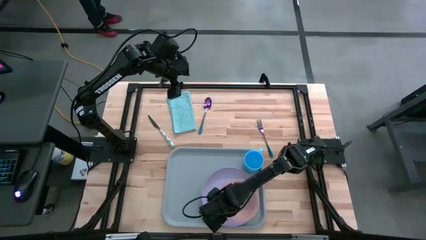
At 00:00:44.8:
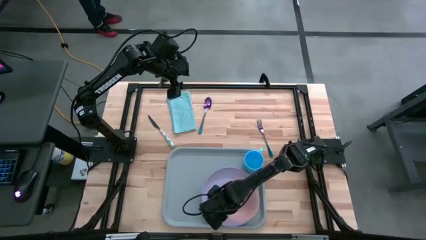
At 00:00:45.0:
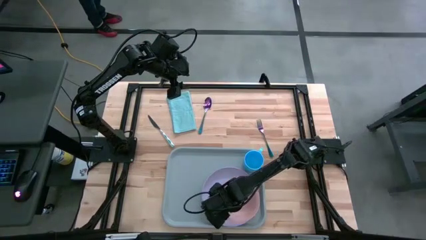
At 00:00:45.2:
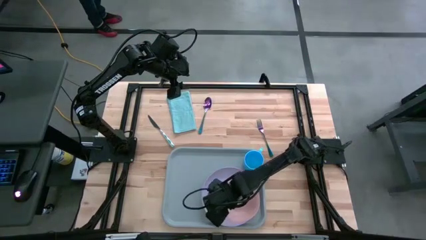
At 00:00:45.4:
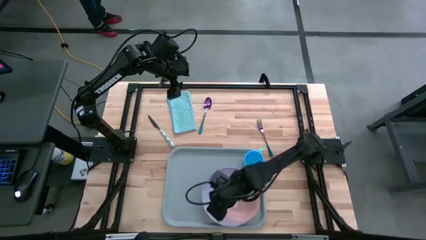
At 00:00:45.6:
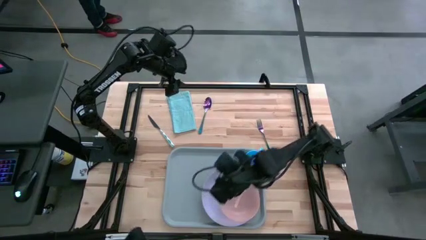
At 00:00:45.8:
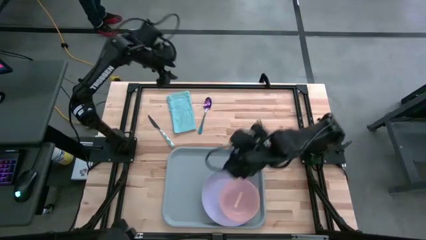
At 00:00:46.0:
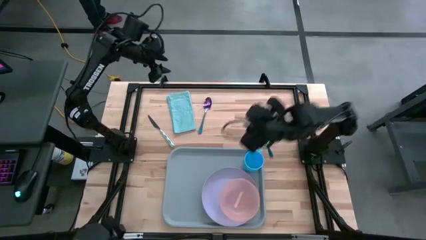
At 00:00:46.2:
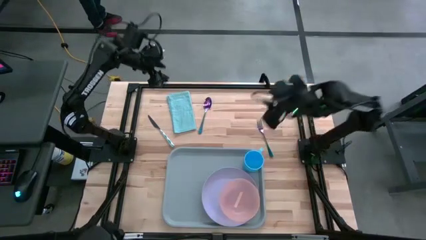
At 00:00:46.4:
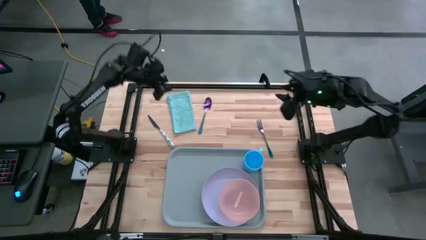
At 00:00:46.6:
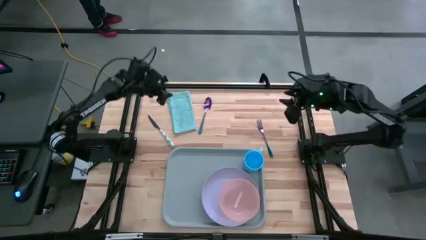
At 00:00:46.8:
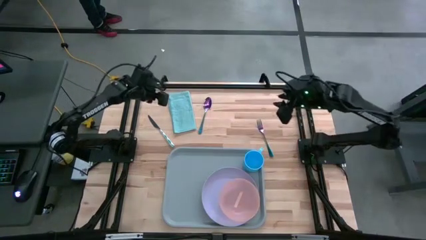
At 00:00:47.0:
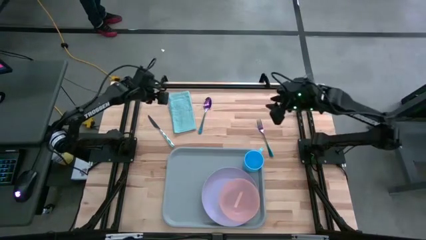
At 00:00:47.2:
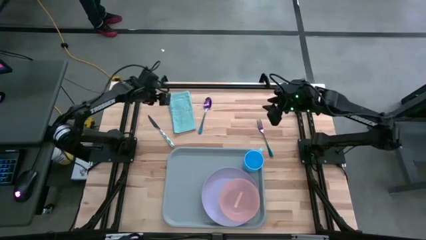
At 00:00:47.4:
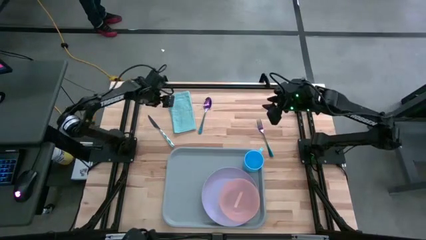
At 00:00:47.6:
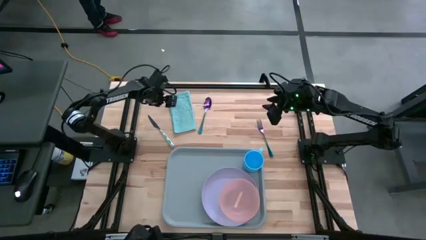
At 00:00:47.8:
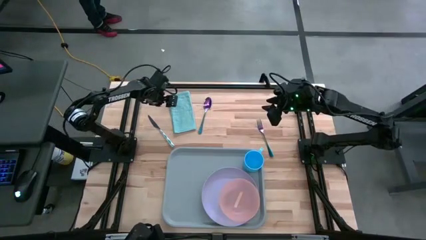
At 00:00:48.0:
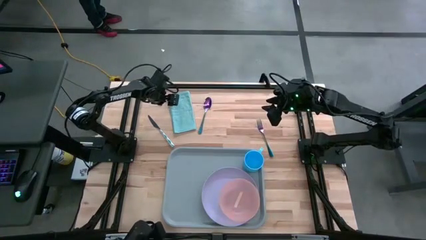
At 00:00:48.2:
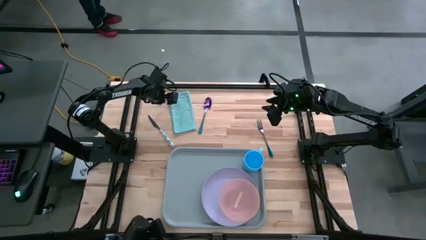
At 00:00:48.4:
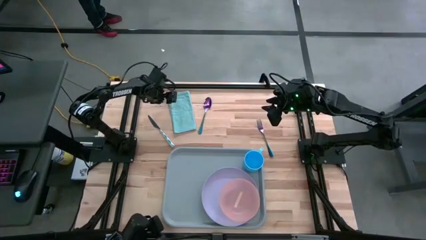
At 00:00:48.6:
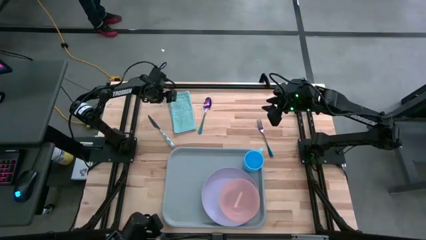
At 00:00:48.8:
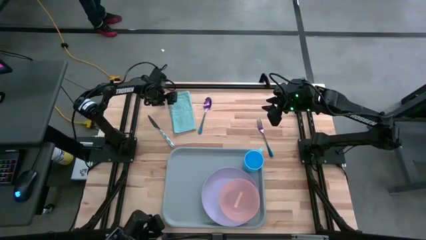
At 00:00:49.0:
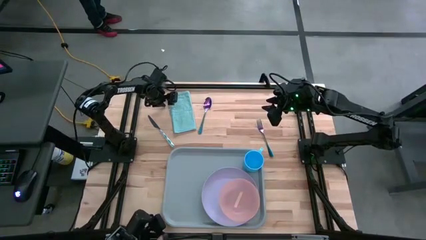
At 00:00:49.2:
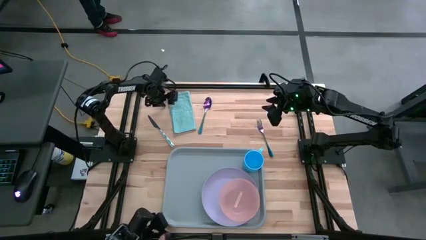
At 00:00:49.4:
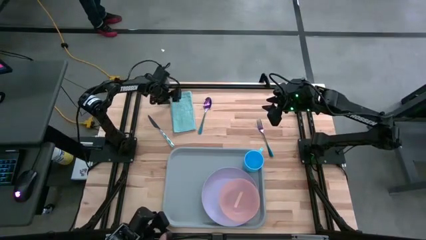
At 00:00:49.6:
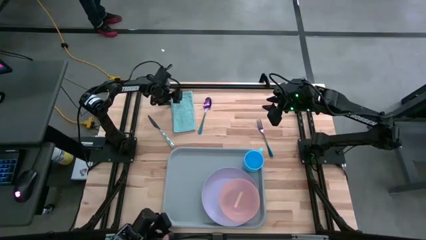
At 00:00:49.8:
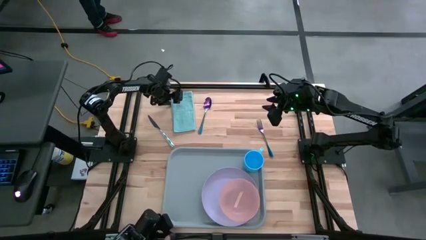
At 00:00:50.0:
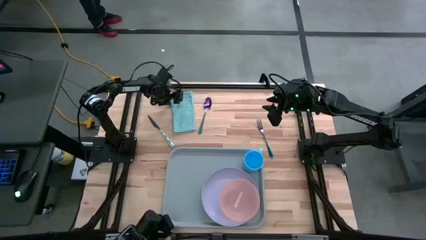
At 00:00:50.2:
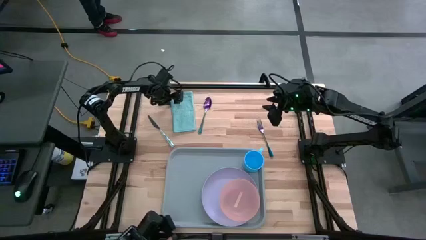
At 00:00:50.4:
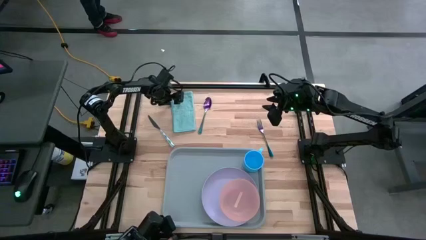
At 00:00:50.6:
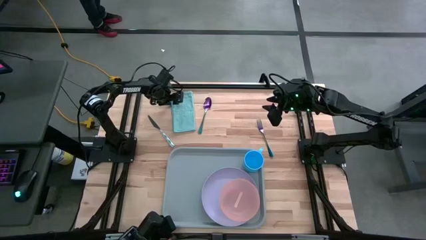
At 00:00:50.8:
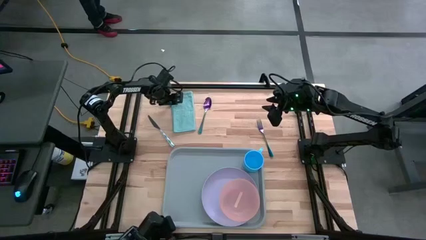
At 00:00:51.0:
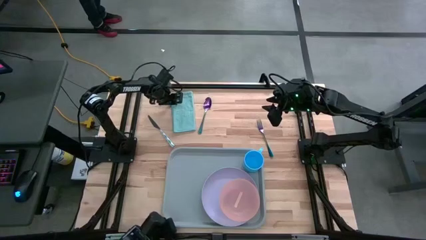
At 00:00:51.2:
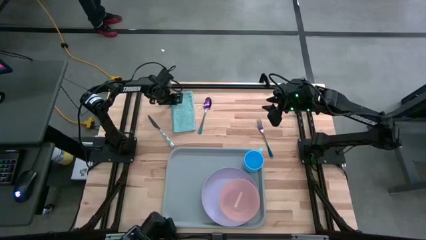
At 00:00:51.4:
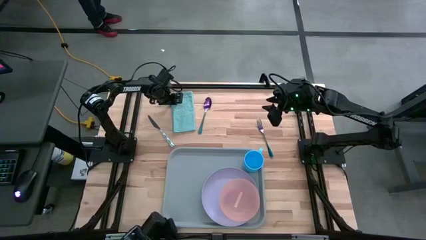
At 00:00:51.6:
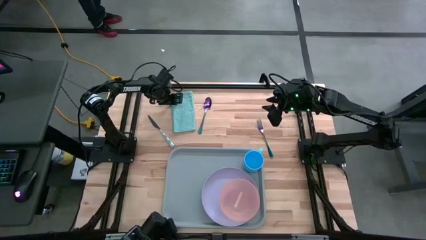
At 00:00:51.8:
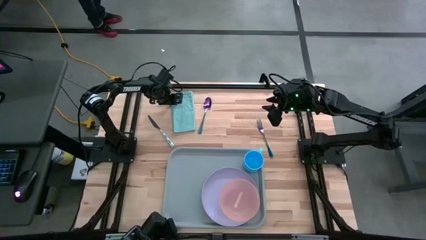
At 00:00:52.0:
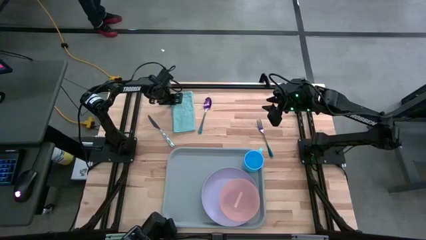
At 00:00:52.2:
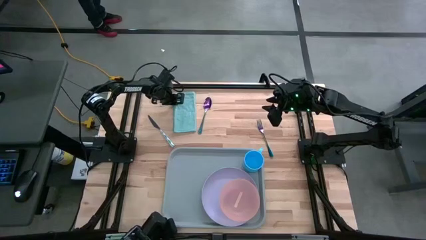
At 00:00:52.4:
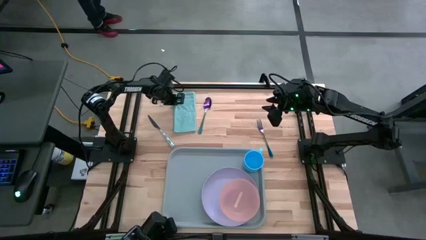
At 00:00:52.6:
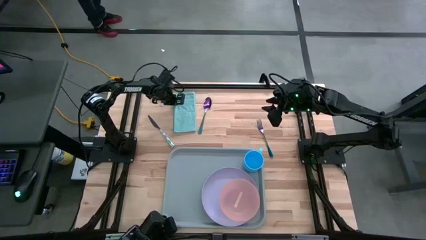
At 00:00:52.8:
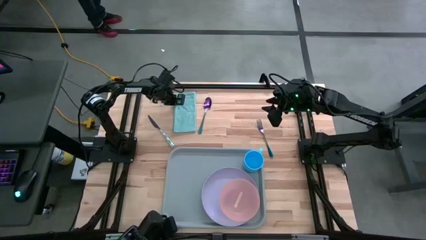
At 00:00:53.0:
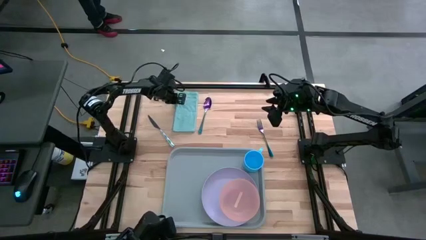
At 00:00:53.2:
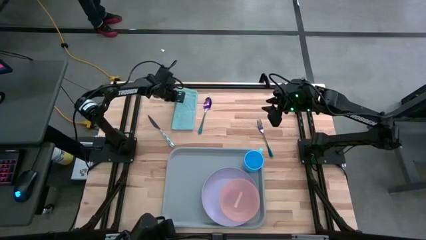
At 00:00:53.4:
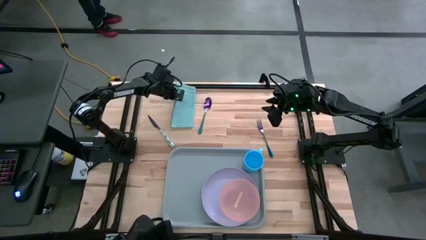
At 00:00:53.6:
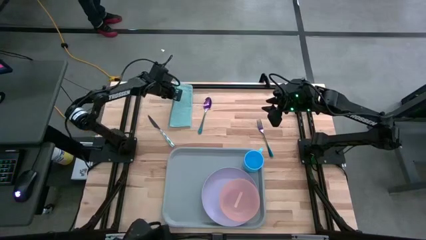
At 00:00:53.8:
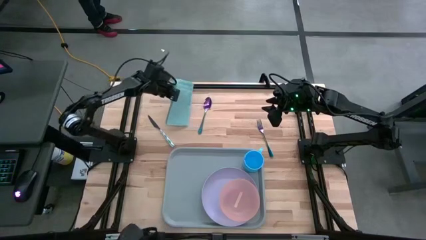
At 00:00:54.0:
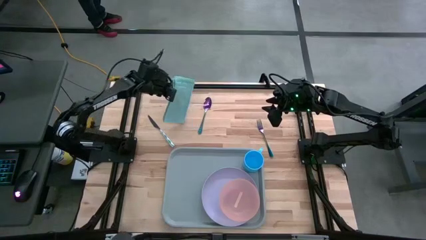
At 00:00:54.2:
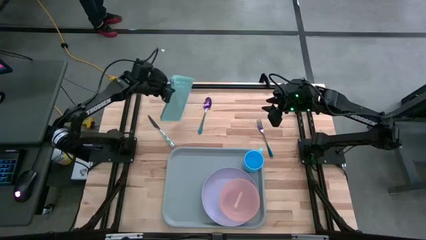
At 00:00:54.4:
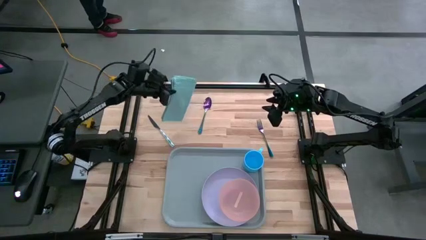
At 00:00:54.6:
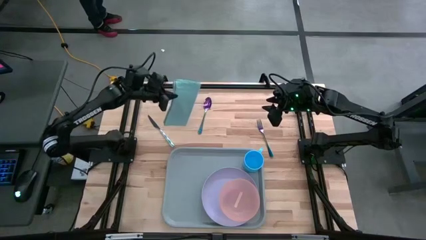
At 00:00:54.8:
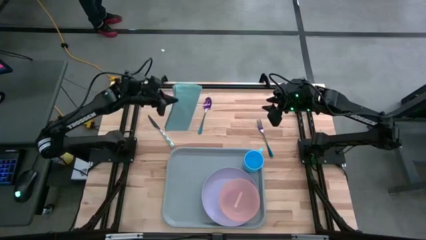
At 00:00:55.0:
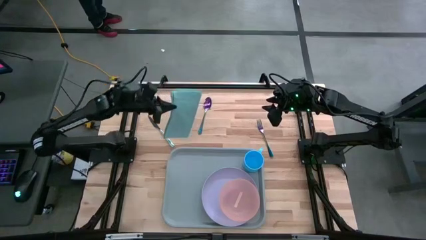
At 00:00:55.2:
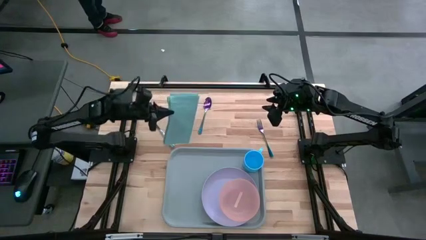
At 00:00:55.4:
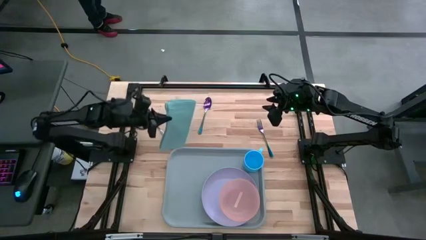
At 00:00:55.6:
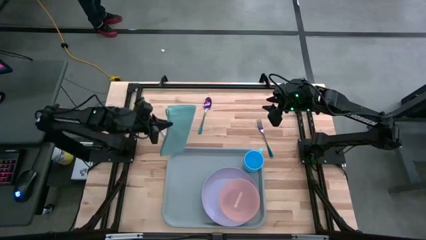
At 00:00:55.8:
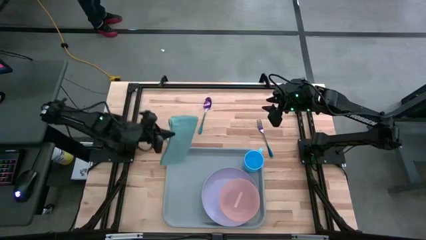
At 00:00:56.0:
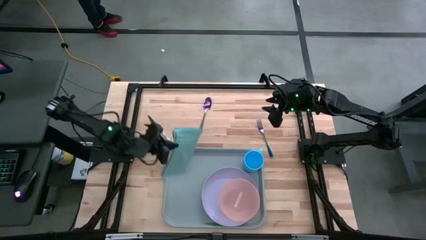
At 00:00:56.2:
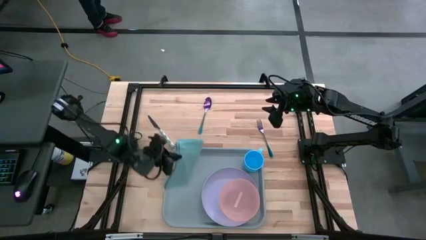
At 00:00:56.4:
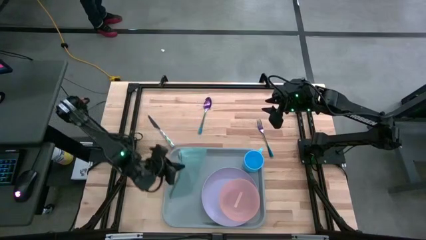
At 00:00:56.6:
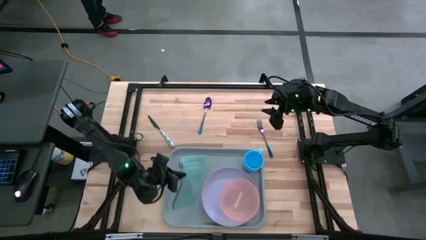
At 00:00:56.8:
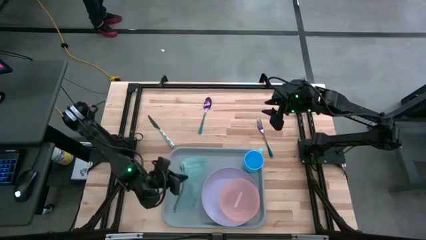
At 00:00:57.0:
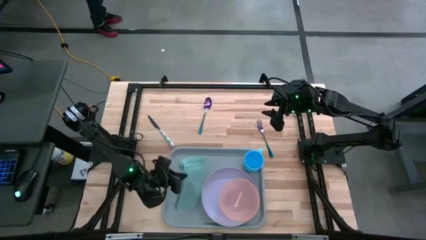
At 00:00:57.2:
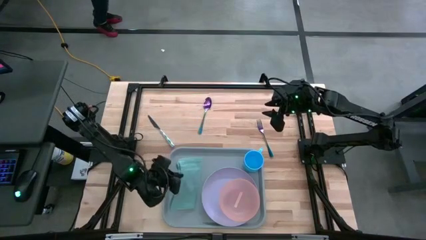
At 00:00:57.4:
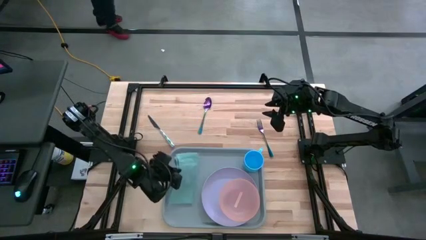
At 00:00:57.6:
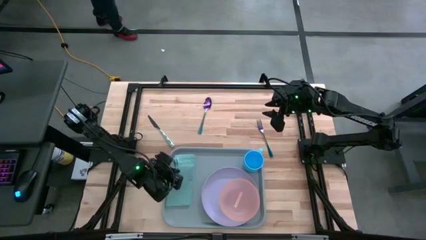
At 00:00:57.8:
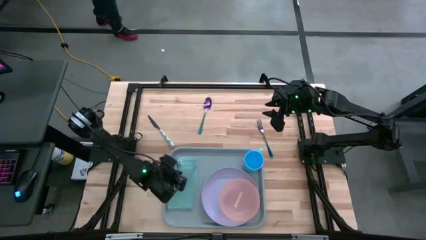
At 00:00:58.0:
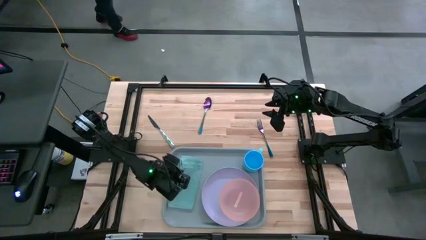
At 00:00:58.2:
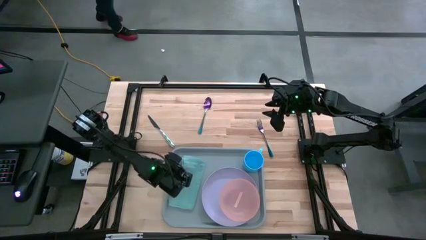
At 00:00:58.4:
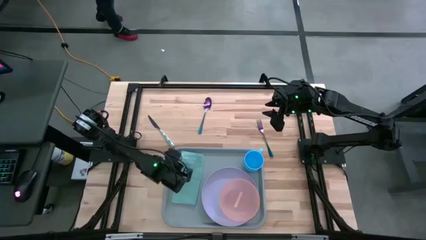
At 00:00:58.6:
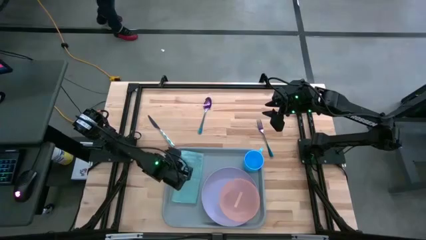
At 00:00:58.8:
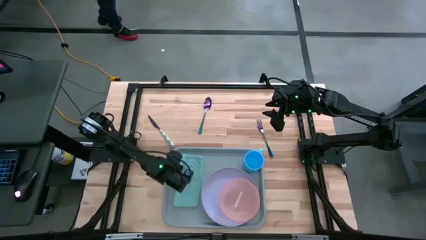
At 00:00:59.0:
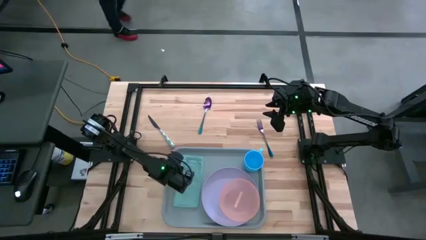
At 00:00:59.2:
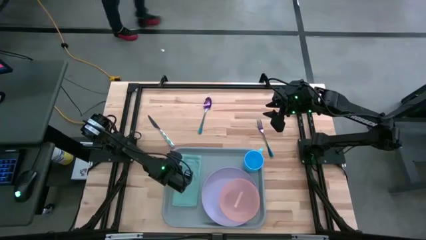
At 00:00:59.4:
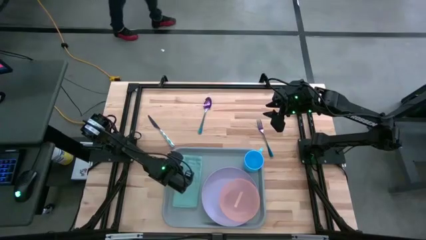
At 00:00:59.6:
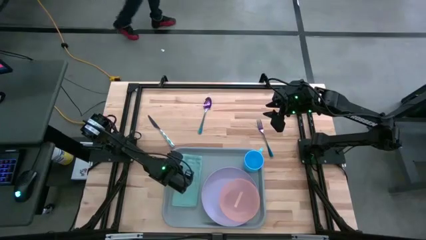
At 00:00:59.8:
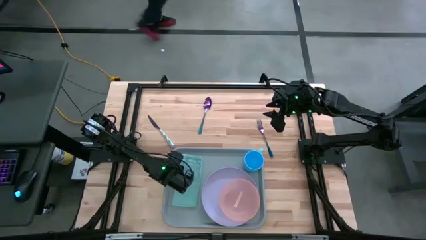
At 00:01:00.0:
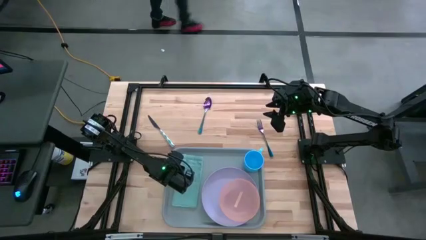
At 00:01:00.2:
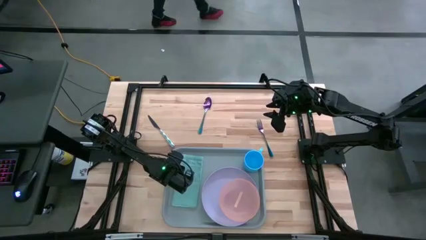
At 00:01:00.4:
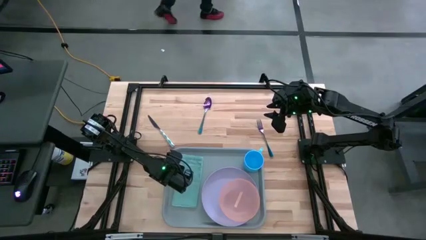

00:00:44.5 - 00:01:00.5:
Task: Set up tray
Put the blue napkin on the gray tray to the left of the purple plate
